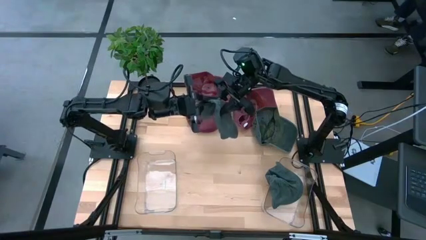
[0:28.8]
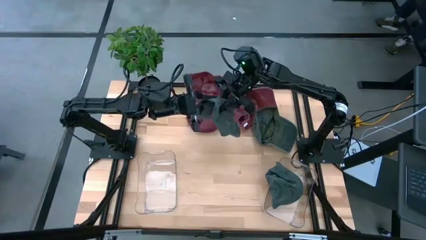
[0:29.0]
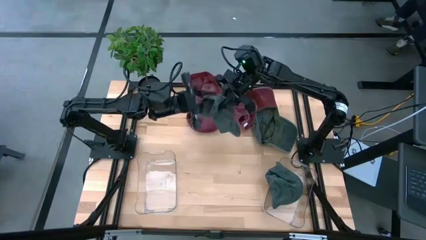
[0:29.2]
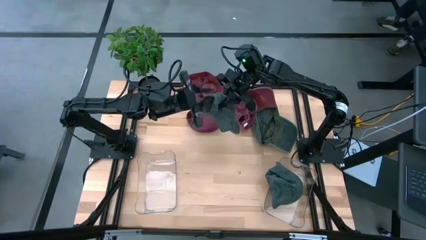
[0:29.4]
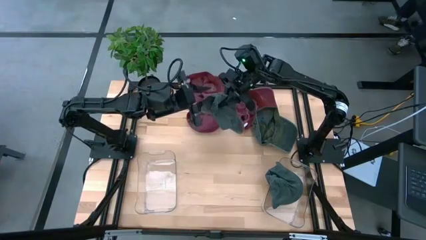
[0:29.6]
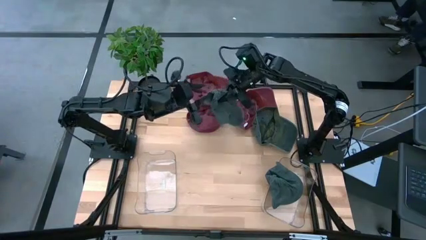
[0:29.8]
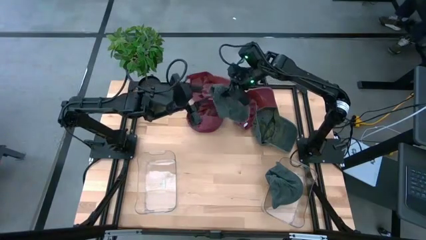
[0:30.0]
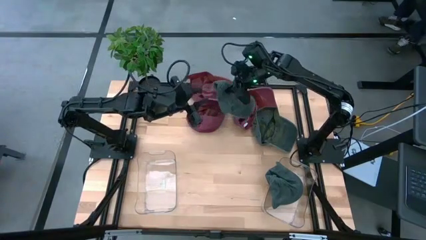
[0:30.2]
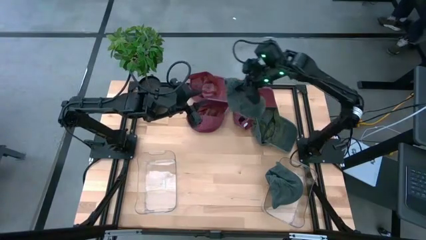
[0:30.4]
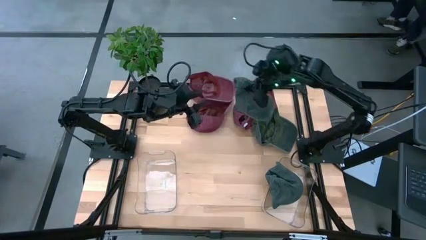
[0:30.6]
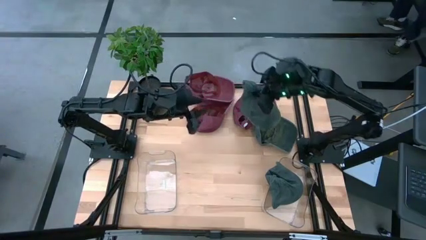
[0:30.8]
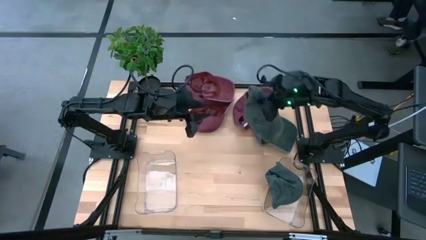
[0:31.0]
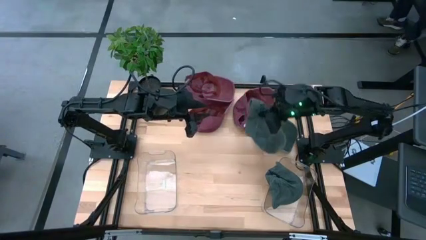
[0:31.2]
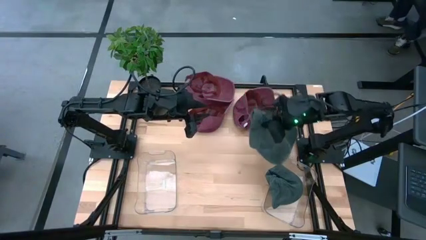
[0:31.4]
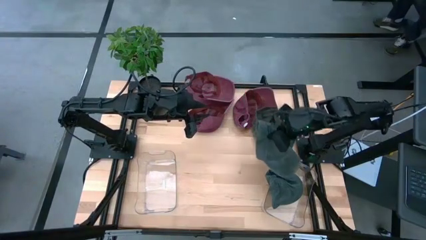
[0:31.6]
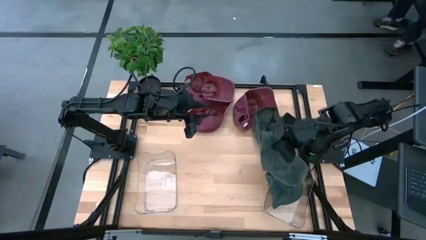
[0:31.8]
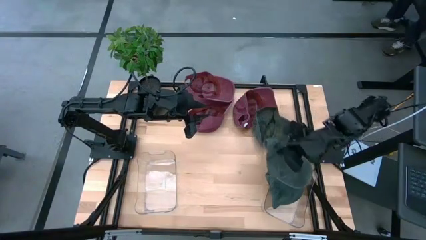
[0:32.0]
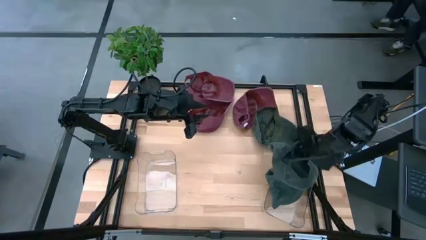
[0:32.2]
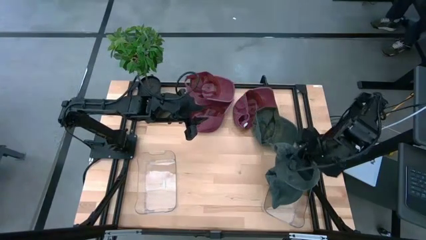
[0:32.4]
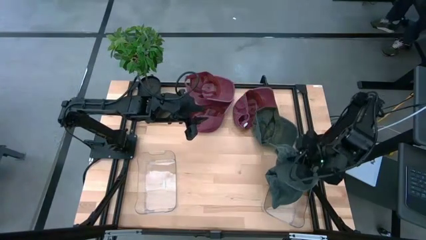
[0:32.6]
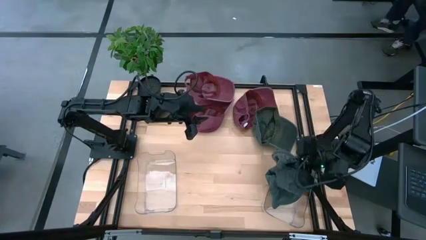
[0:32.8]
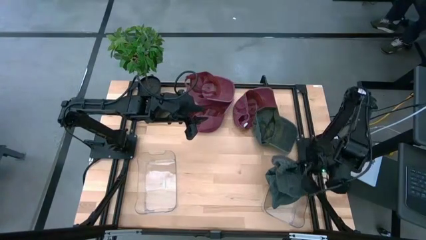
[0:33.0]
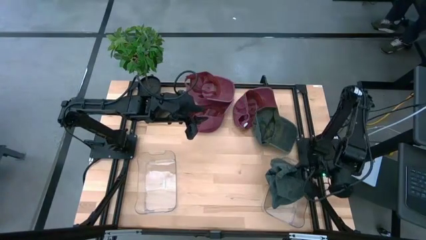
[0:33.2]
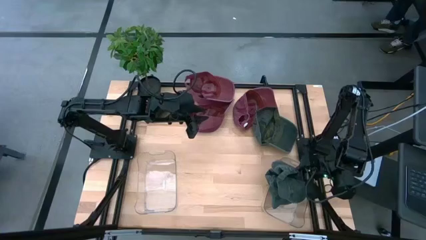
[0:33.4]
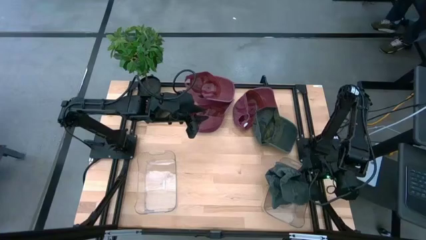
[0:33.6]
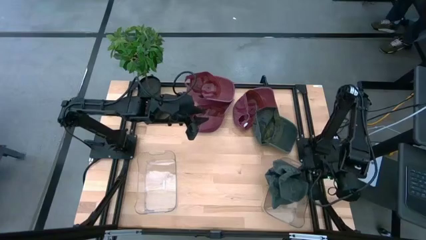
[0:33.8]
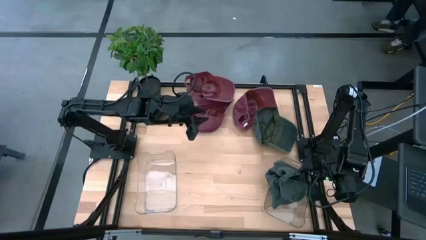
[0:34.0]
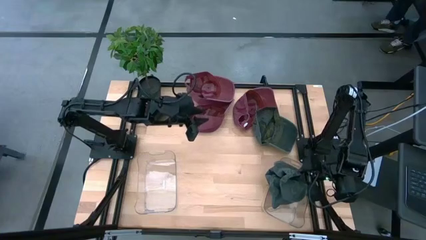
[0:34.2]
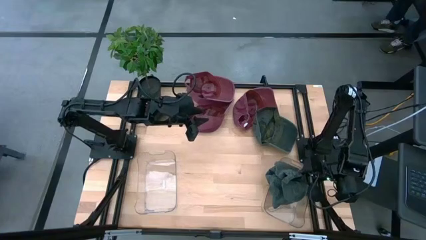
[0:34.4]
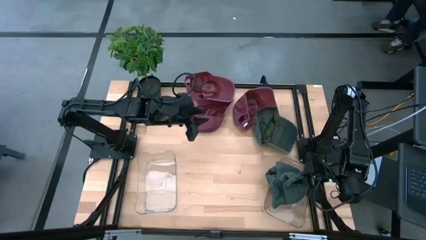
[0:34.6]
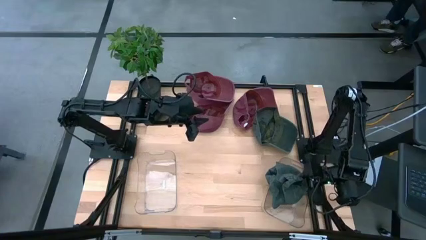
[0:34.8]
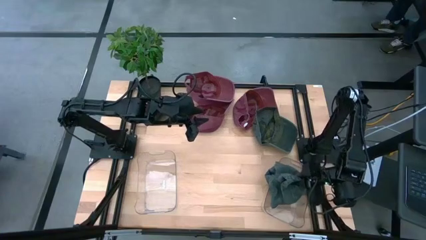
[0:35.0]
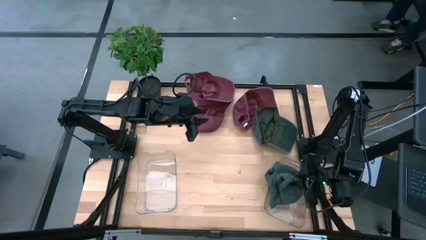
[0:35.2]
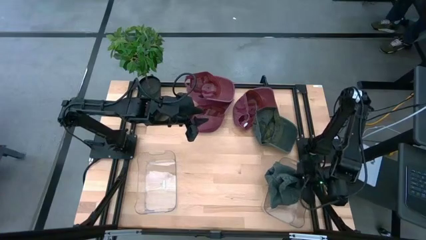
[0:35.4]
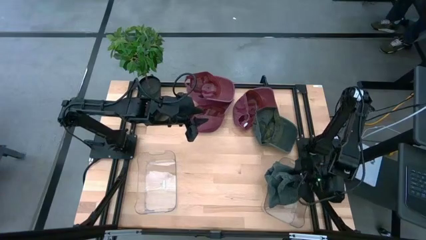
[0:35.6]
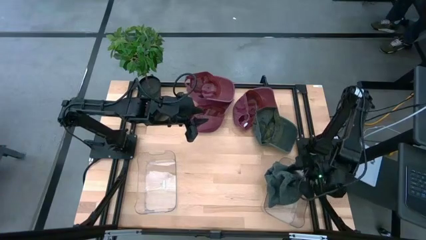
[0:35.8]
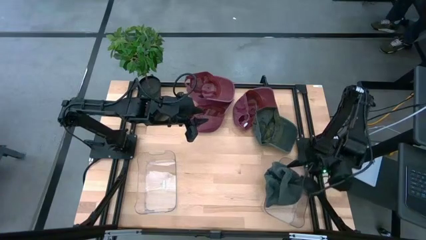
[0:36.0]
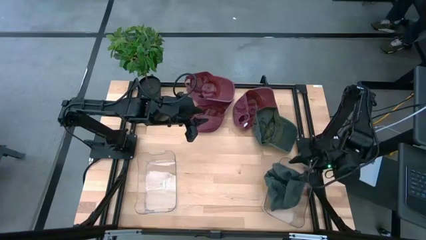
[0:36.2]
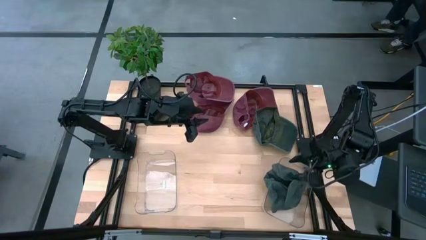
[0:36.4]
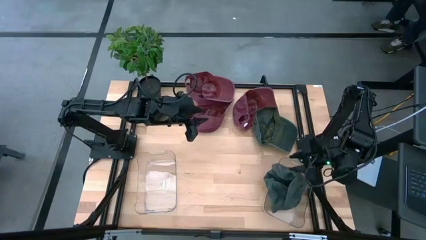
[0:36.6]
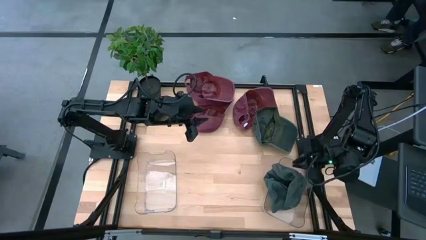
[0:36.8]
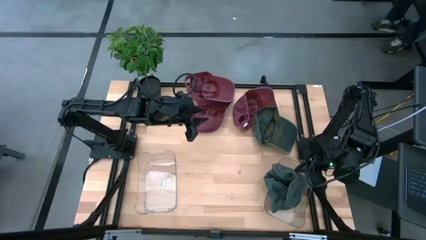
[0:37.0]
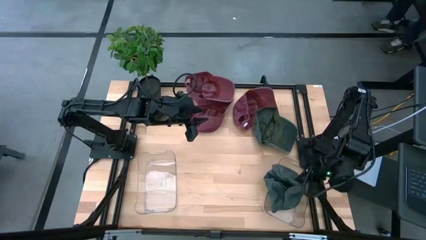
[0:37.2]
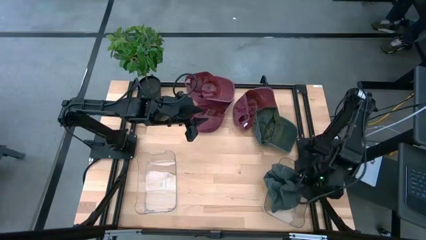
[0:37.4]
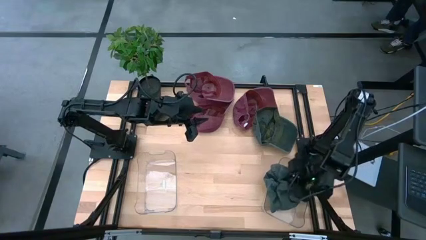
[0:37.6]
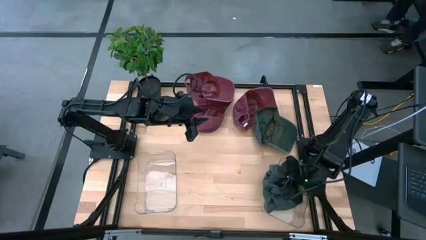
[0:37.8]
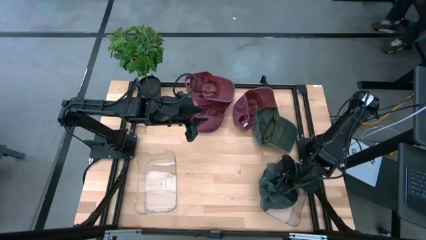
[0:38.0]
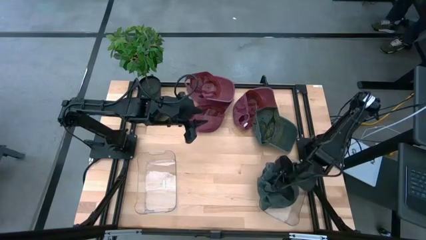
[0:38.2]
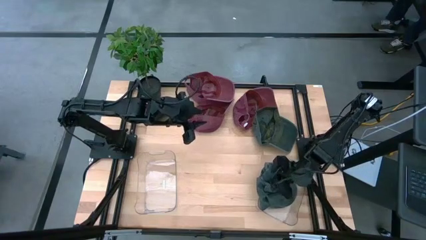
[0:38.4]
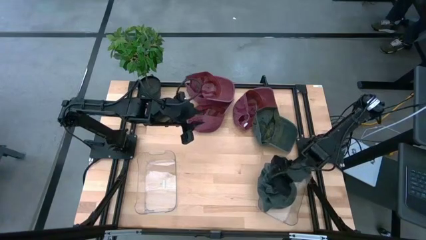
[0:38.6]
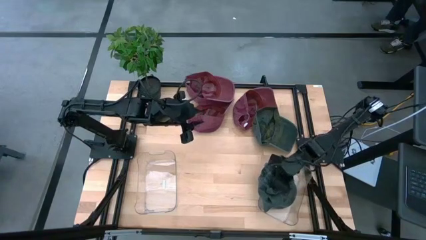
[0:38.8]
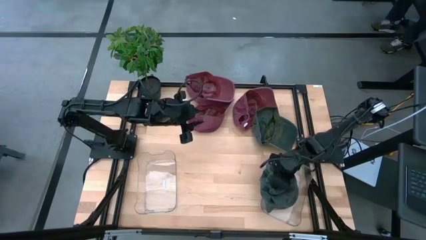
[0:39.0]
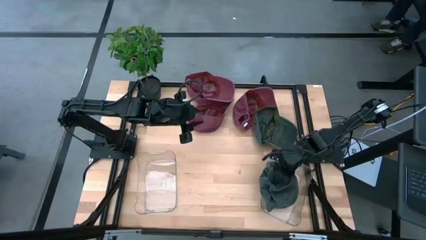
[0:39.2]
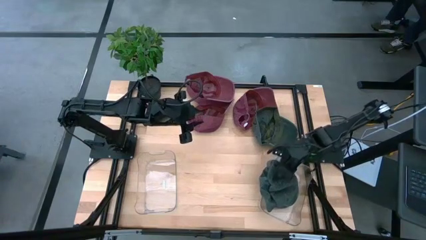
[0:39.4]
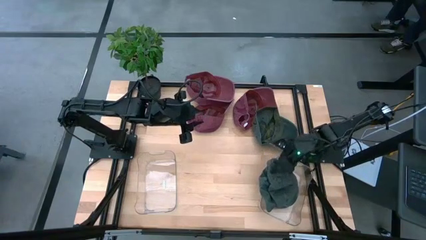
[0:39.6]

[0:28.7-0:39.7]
Task: Pick & Place hat
Put the left gray cap into the right transparent bin
